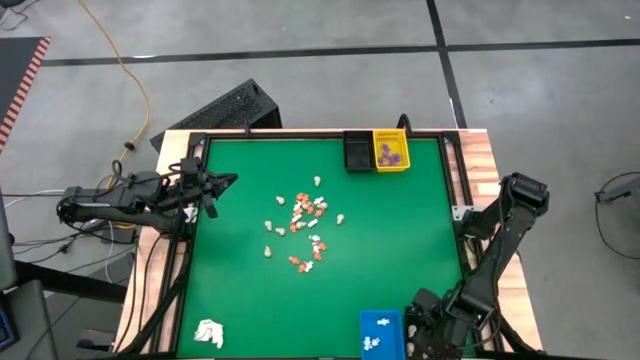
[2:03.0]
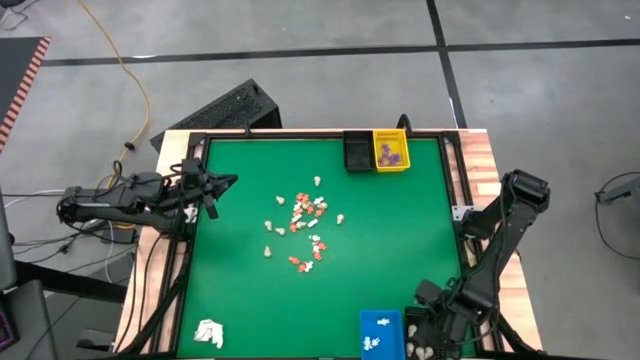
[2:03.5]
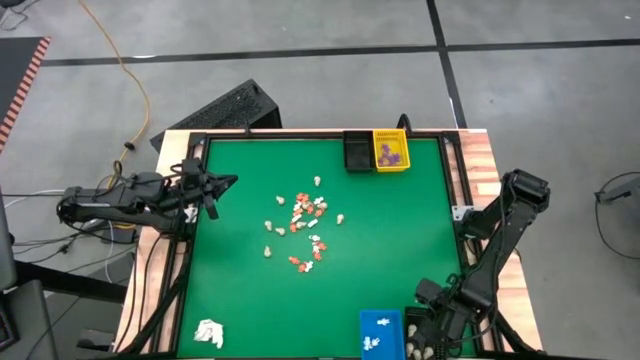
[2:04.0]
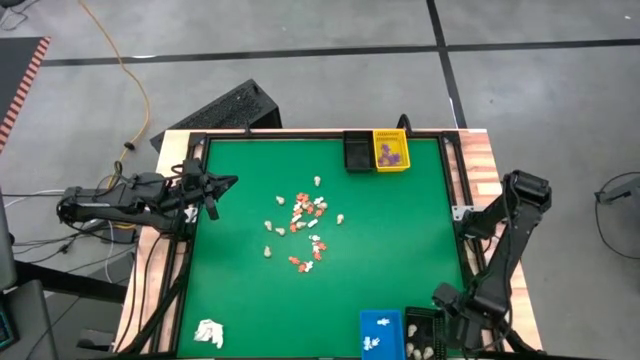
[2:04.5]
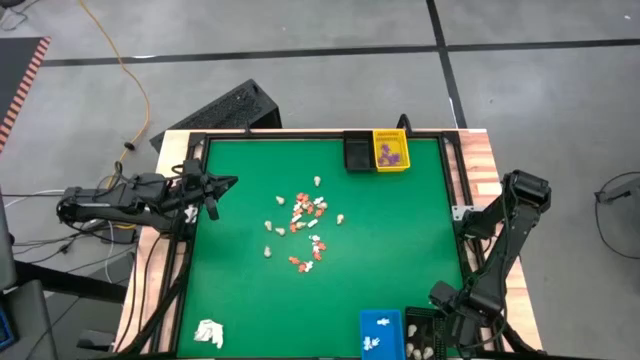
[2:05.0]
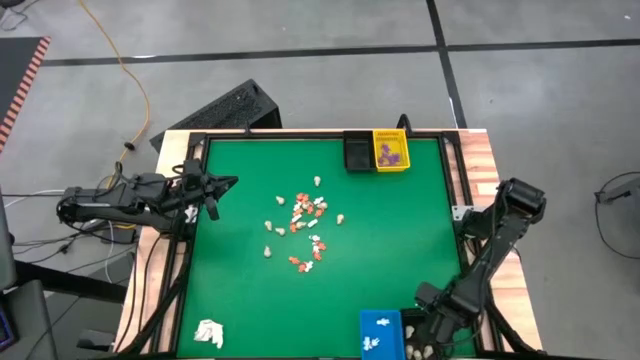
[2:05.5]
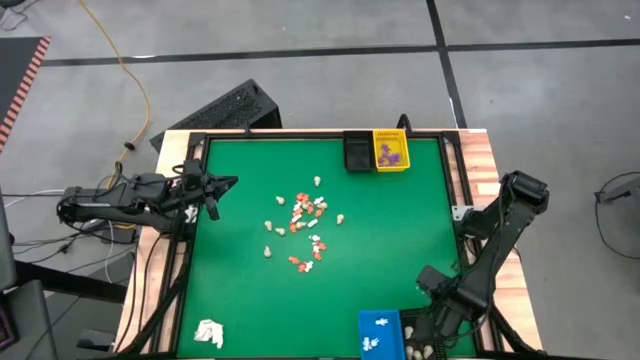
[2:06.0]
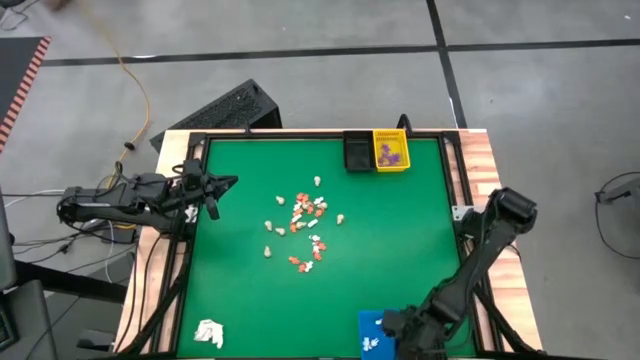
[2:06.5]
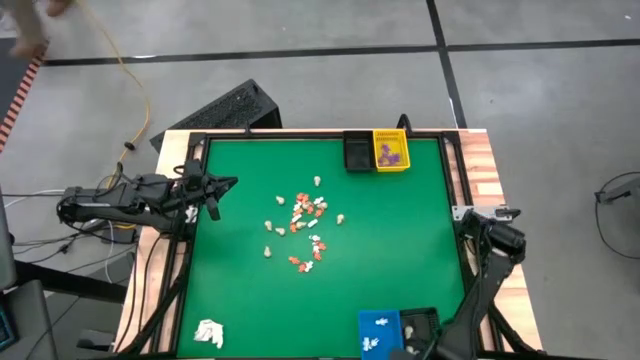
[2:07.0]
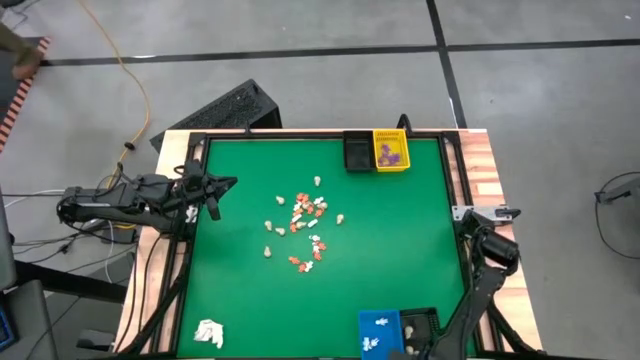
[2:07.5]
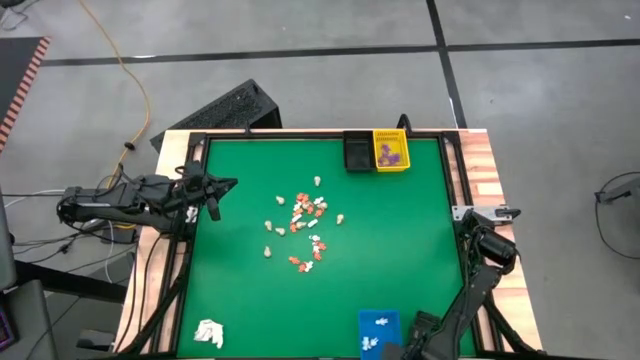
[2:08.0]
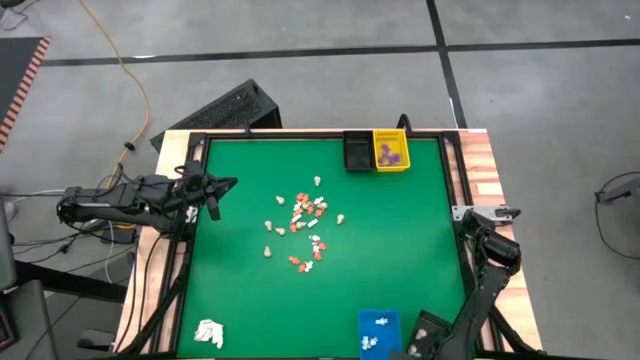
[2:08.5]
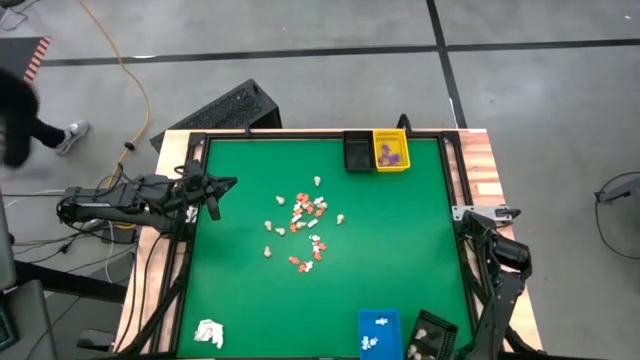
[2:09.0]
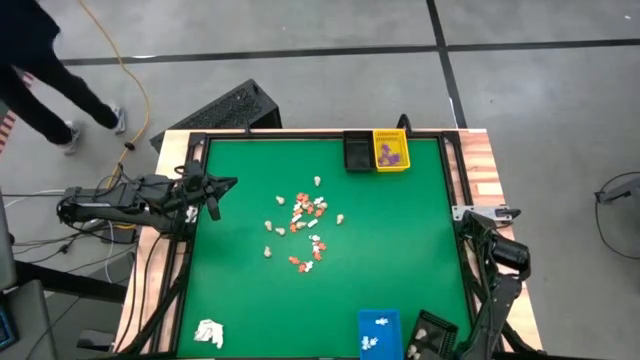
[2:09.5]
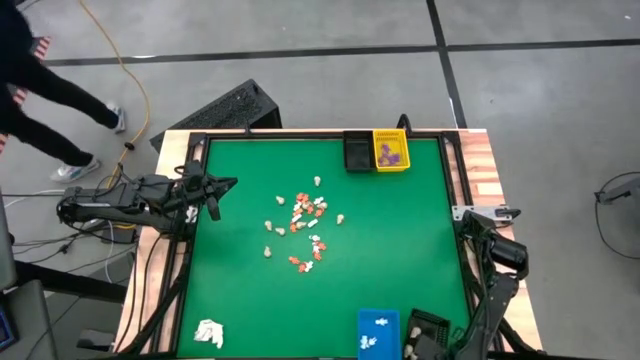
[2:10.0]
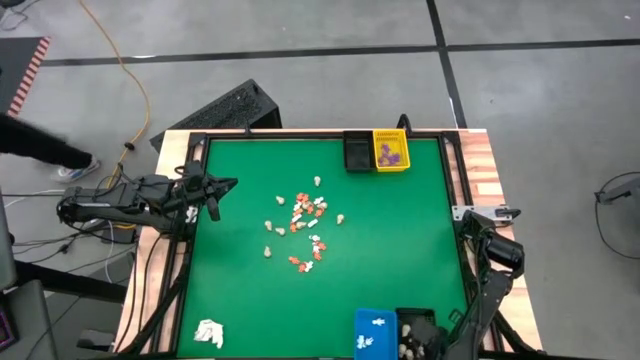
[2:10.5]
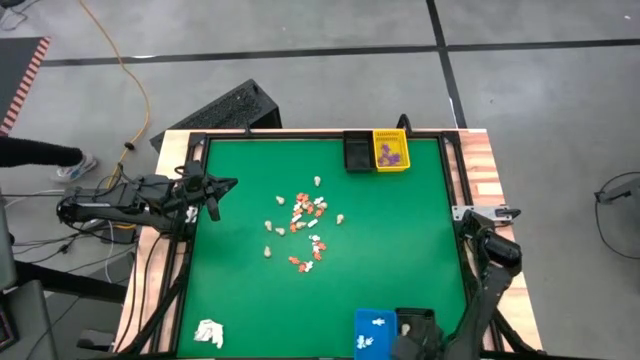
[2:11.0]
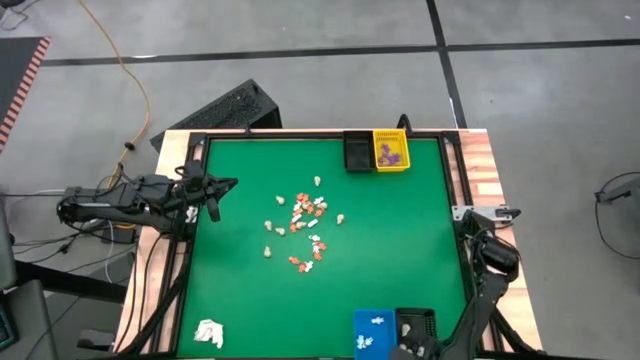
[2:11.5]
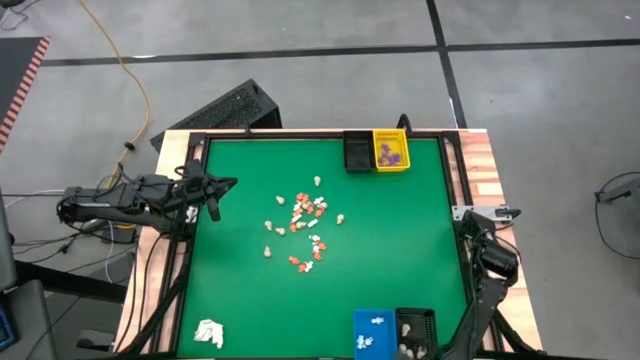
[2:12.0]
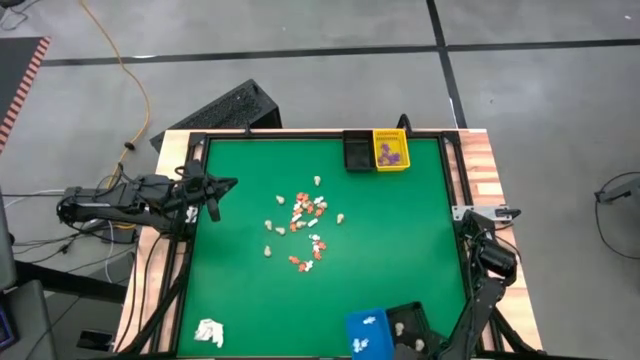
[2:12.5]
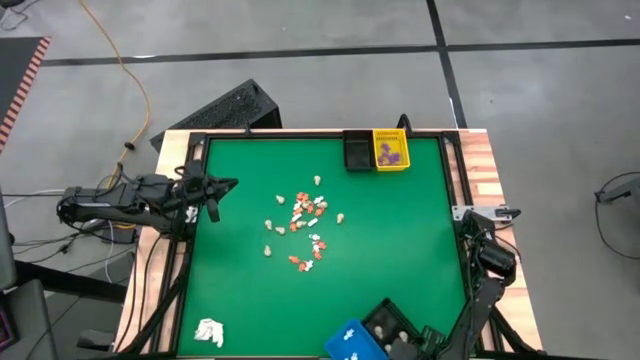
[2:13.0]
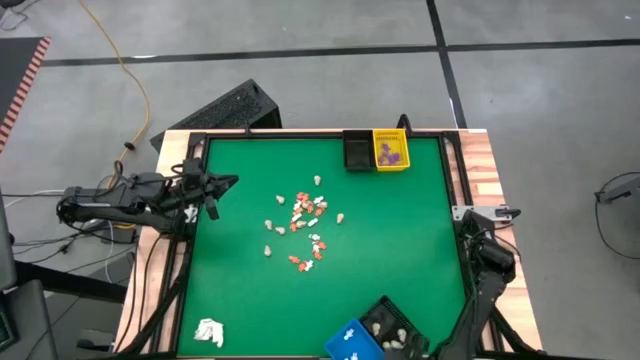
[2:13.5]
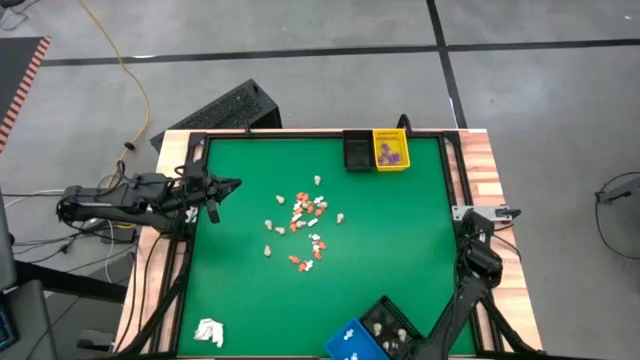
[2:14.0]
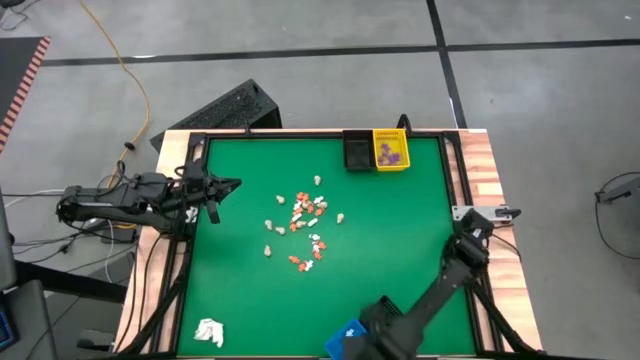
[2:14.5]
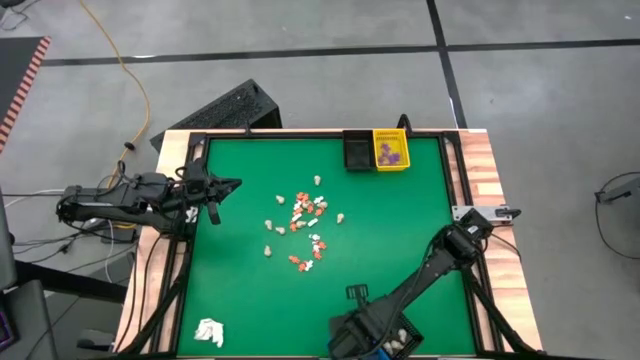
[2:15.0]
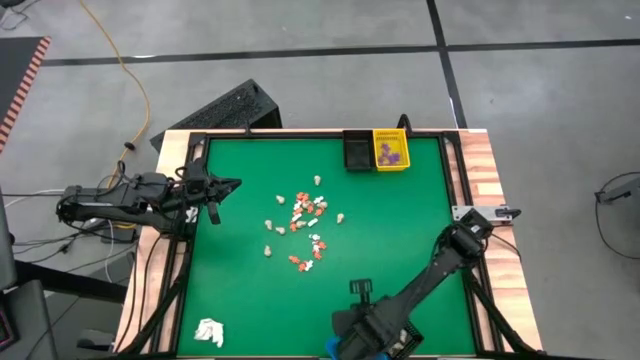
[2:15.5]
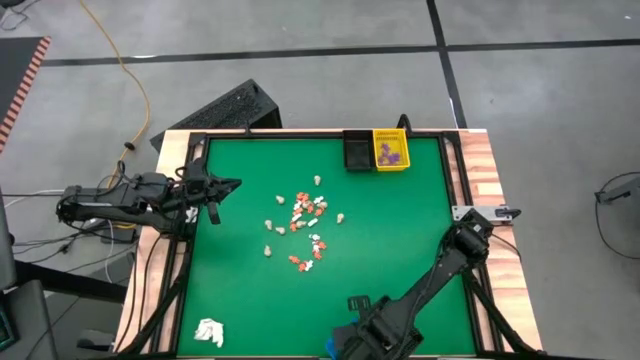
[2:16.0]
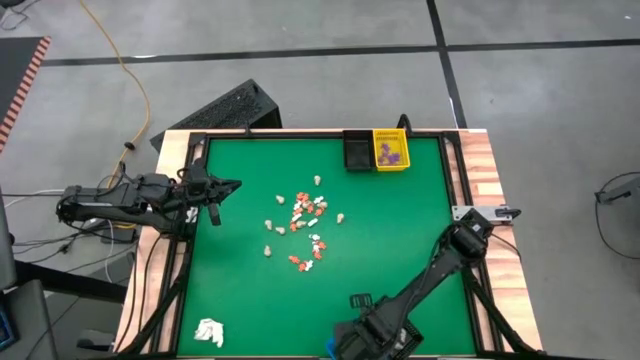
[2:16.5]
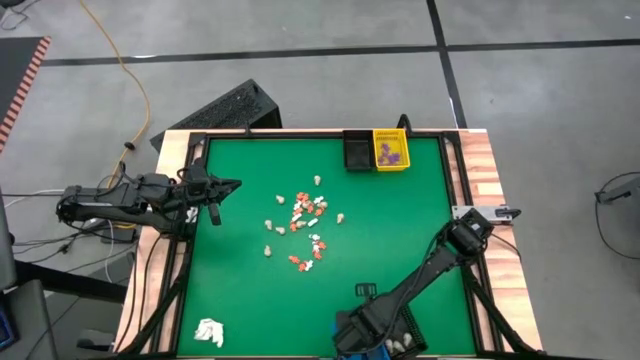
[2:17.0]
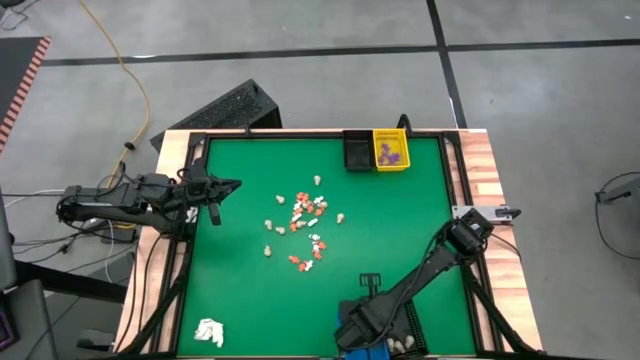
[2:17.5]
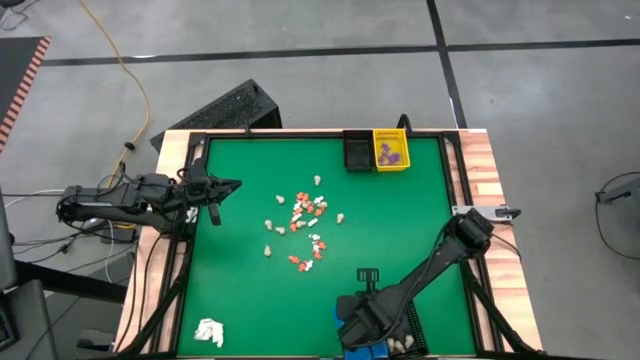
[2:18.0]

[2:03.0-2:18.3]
Task: Sort Halloween decoration
Adjust the bottom baskets

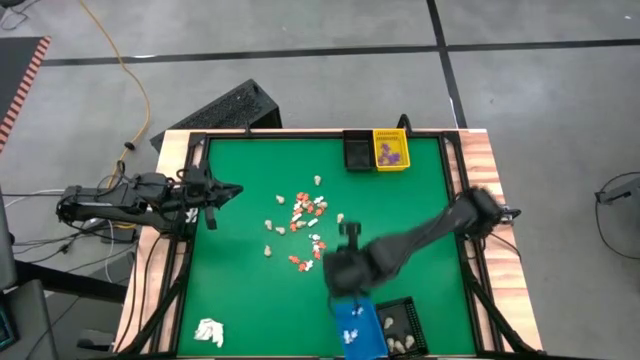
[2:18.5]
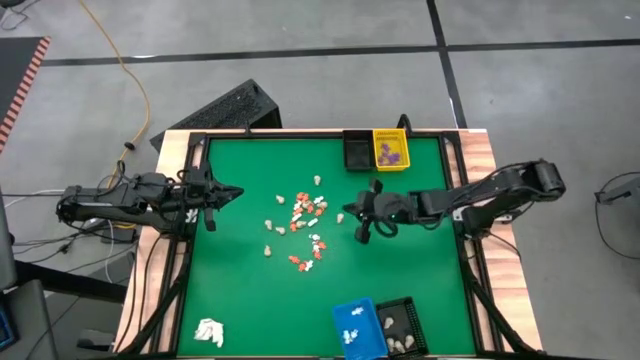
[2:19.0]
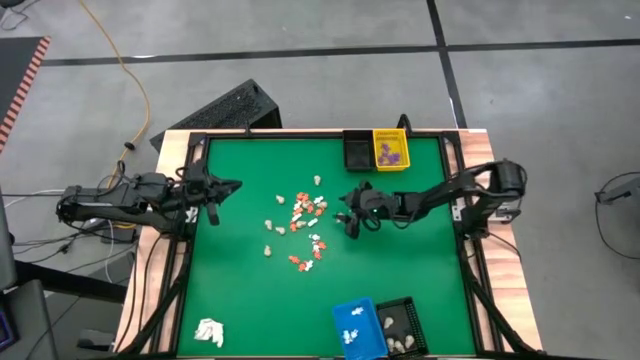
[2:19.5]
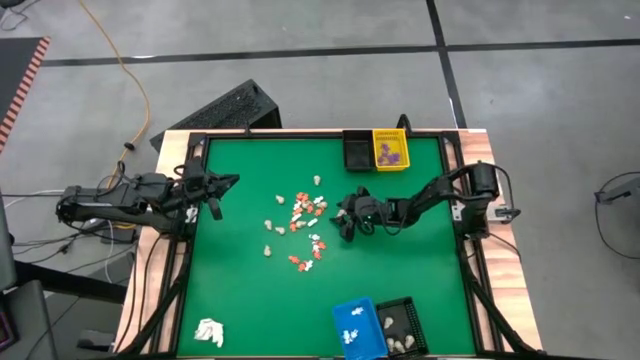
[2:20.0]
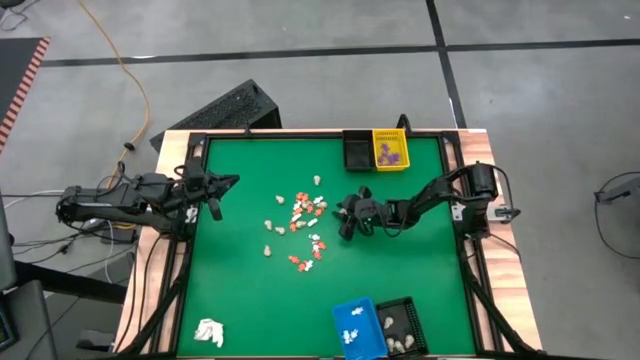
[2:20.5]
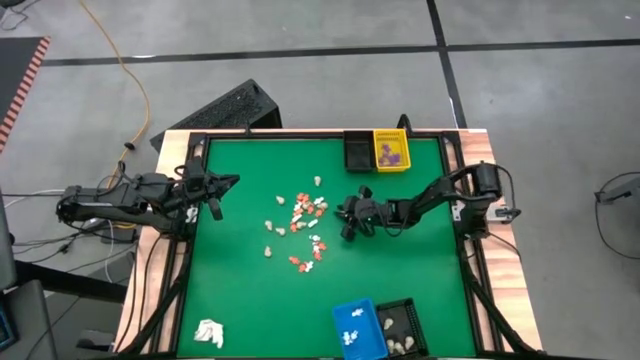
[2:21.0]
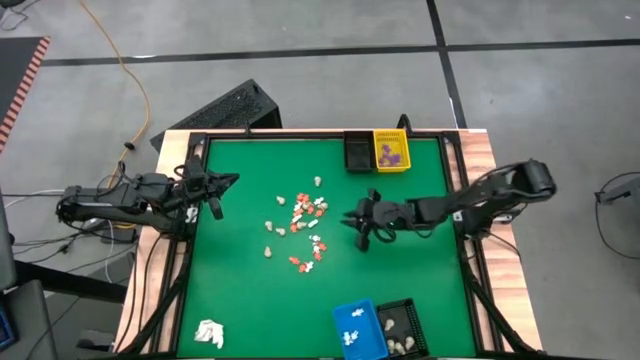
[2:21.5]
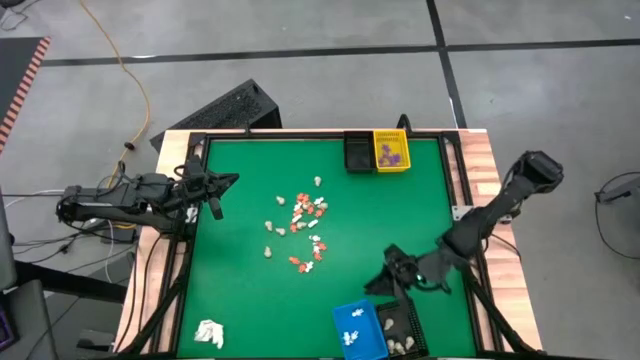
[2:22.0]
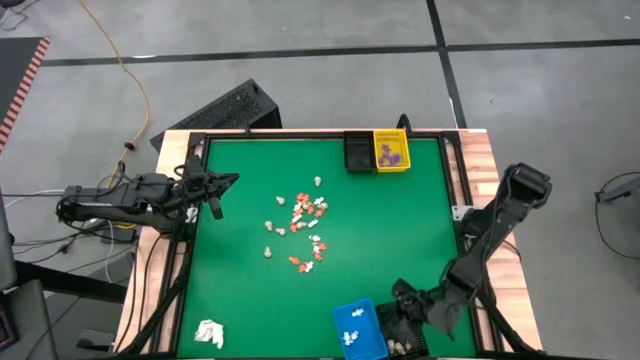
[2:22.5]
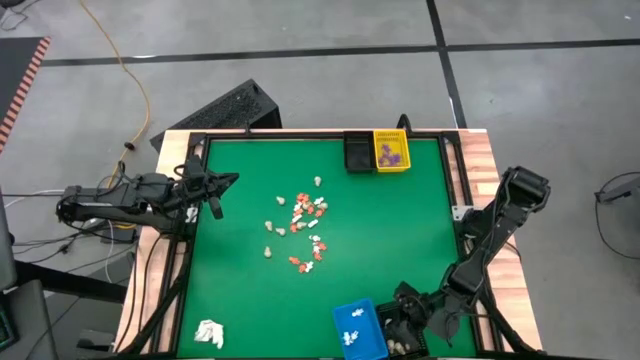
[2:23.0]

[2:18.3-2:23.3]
Put the white skull toy into the bottom black basket

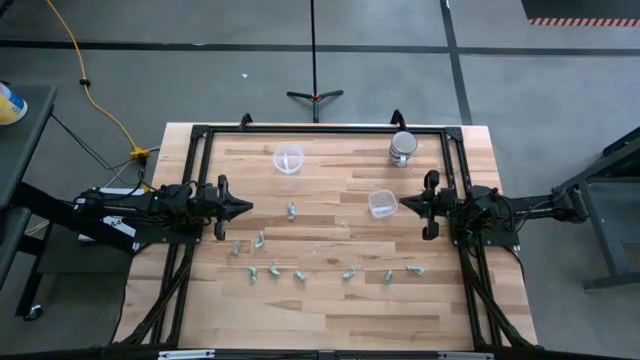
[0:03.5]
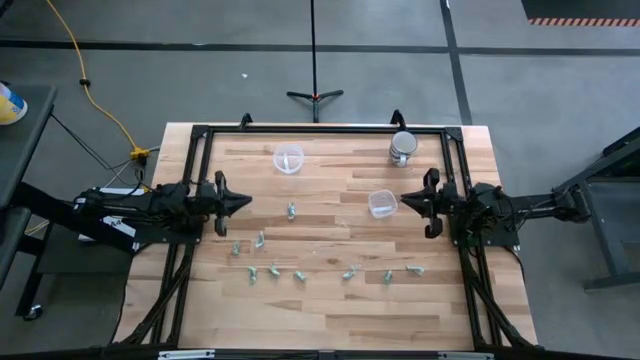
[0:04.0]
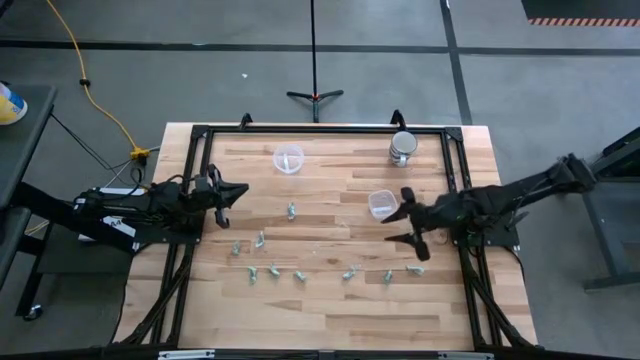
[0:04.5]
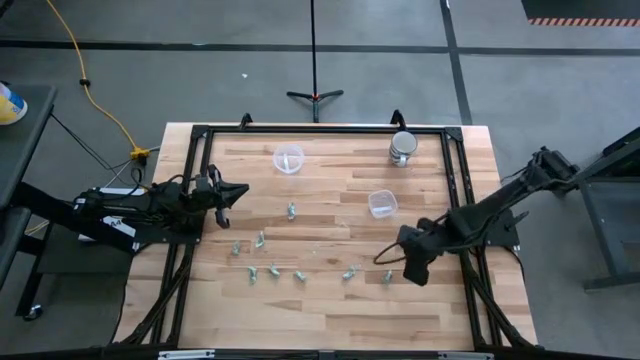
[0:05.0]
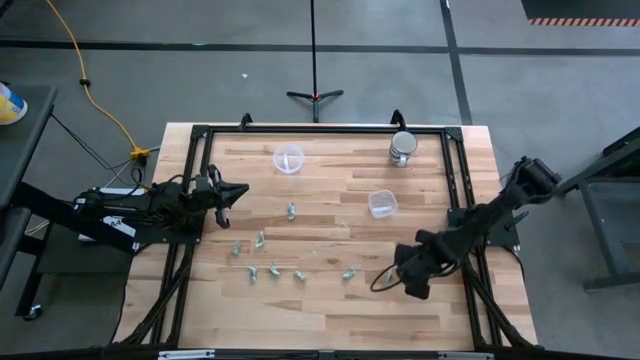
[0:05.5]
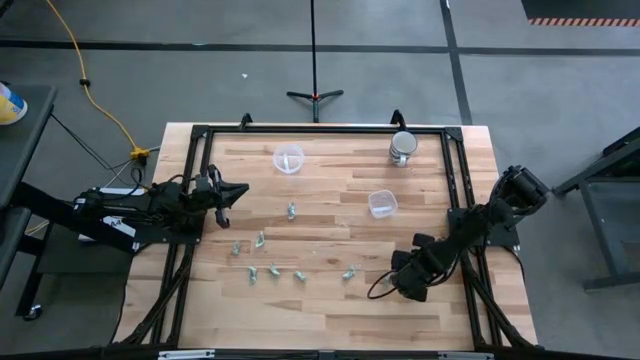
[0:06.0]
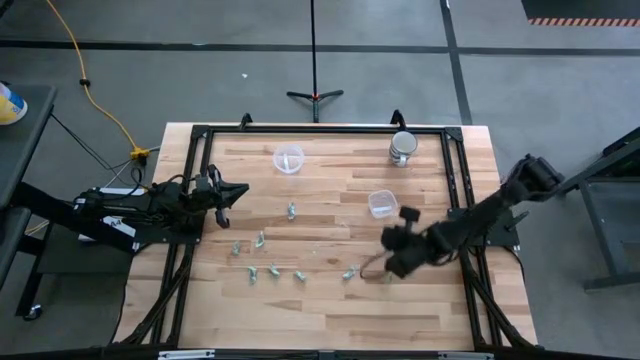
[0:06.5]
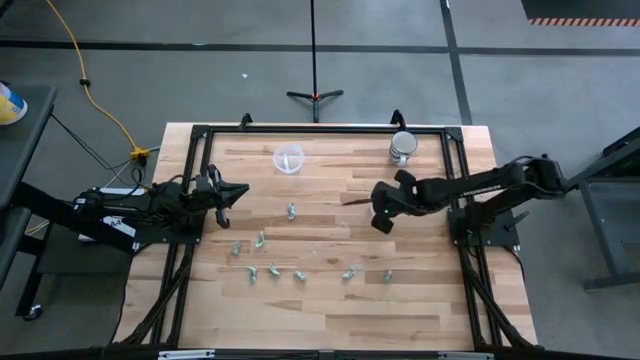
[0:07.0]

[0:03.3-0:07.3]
Task: Pick and place Stevia / Truvia into bins
Put the stevia packet into the square transparent container
